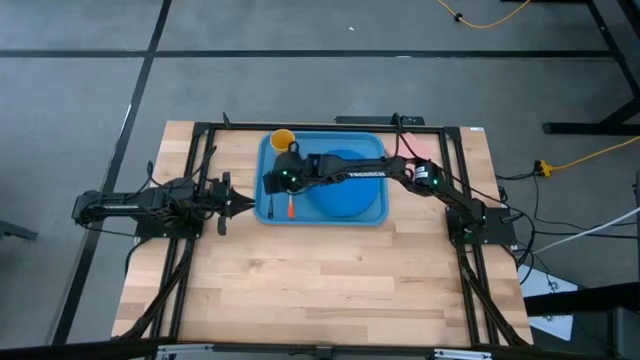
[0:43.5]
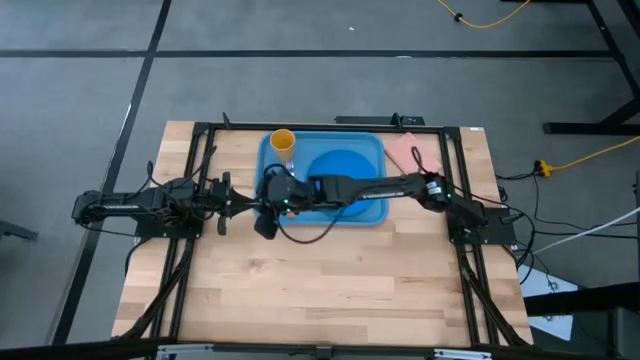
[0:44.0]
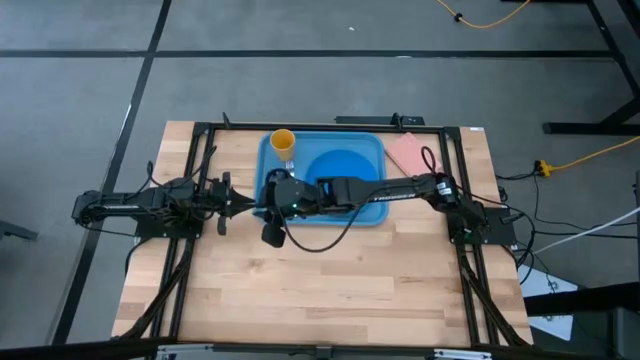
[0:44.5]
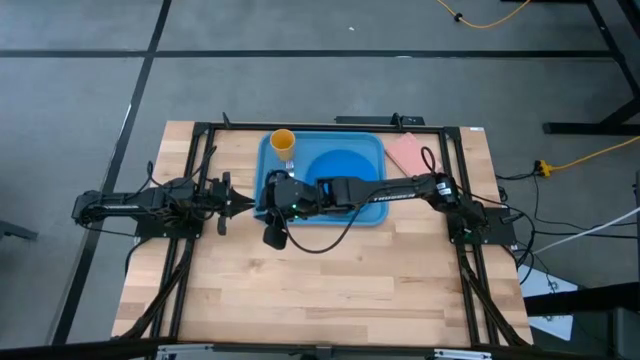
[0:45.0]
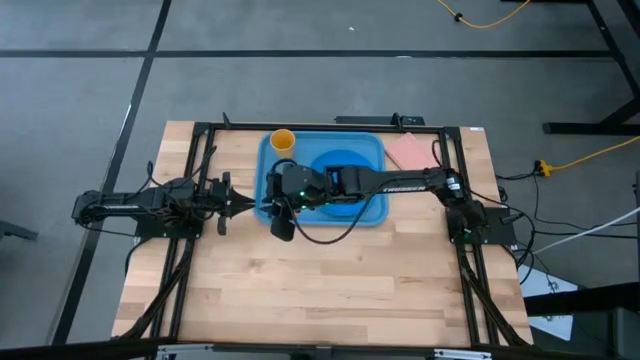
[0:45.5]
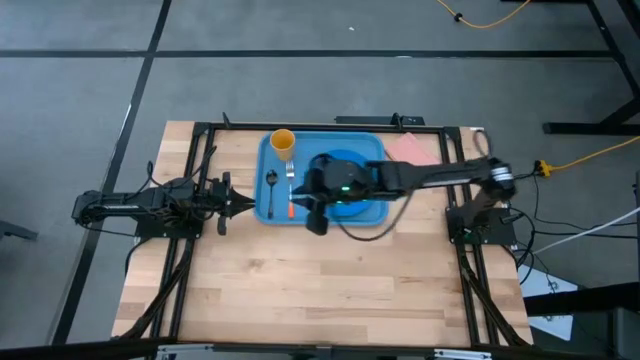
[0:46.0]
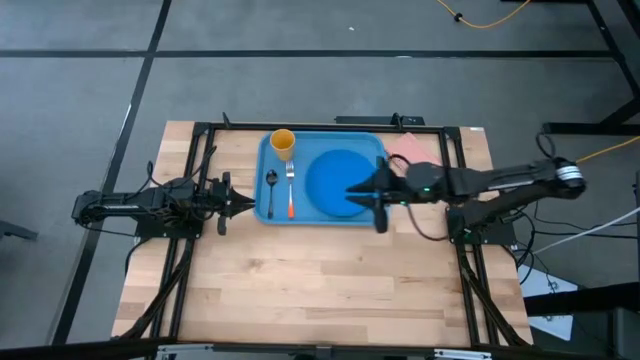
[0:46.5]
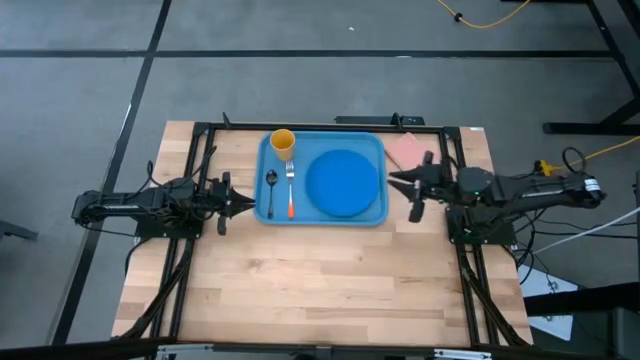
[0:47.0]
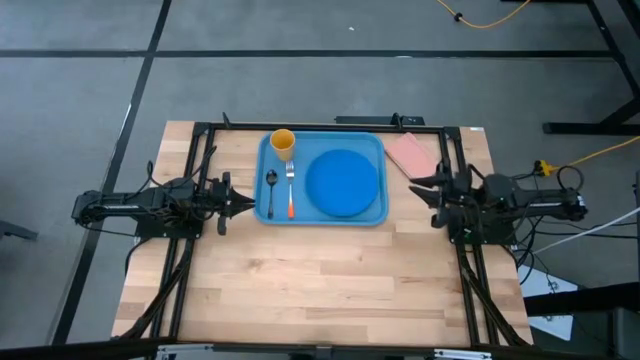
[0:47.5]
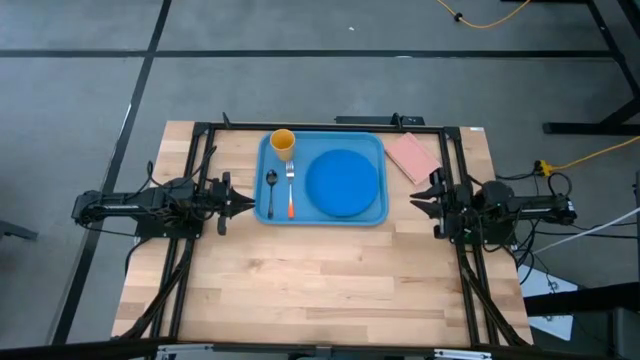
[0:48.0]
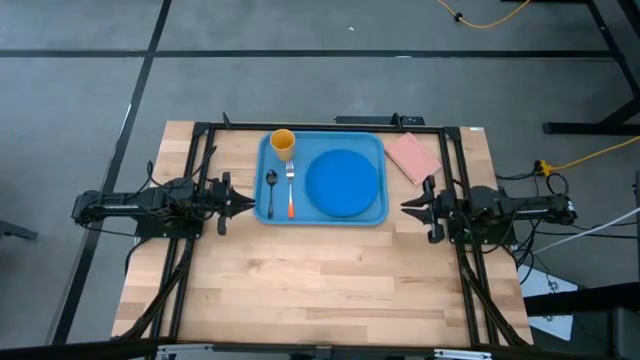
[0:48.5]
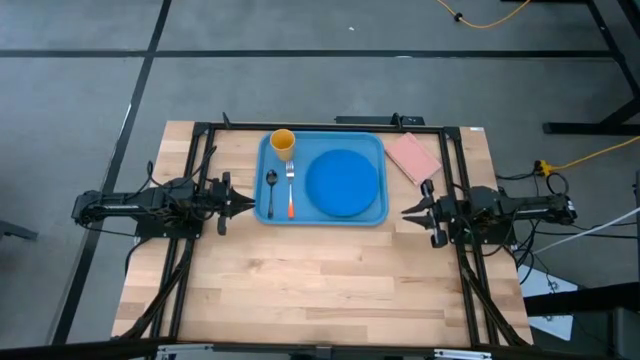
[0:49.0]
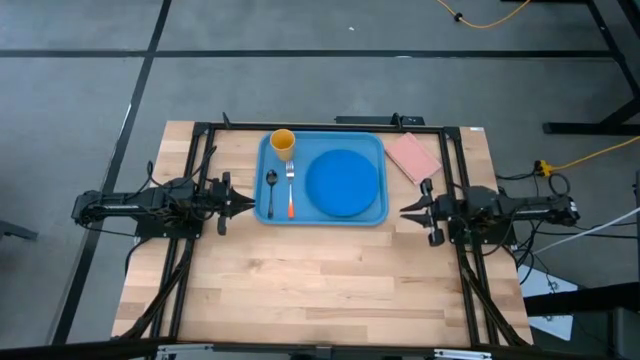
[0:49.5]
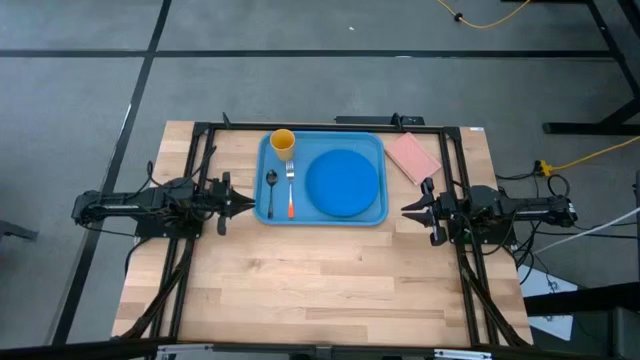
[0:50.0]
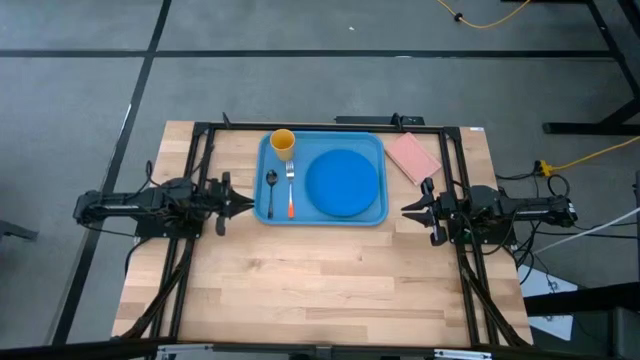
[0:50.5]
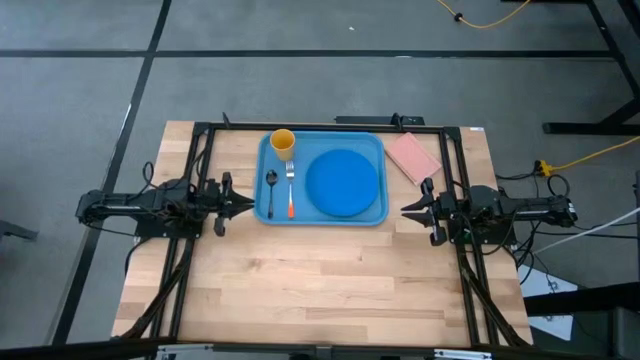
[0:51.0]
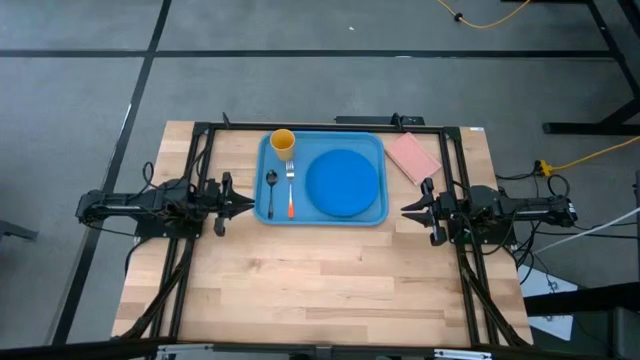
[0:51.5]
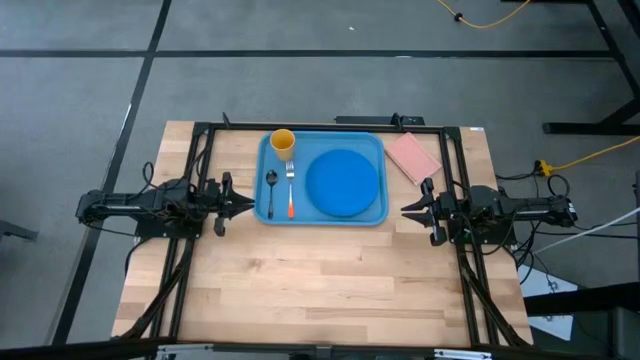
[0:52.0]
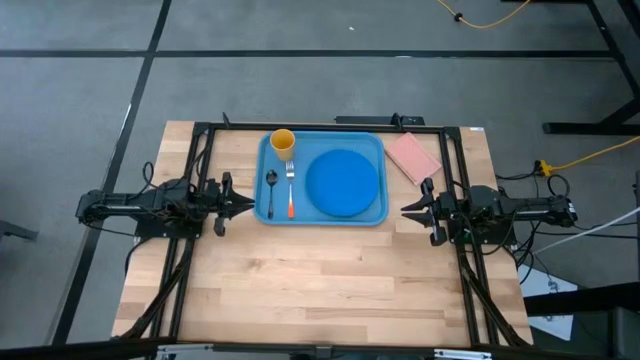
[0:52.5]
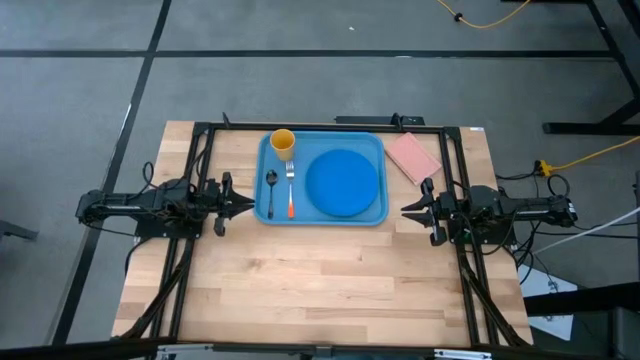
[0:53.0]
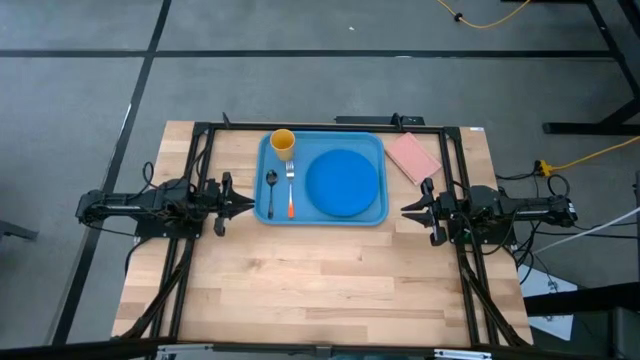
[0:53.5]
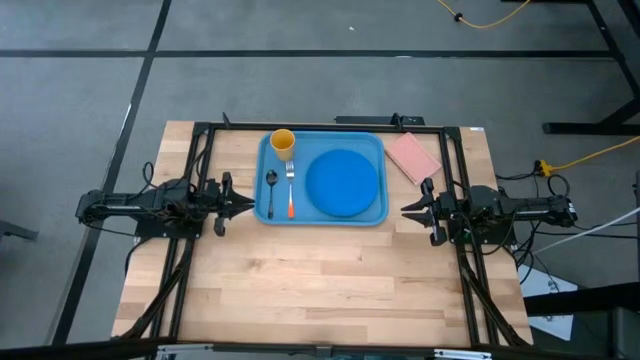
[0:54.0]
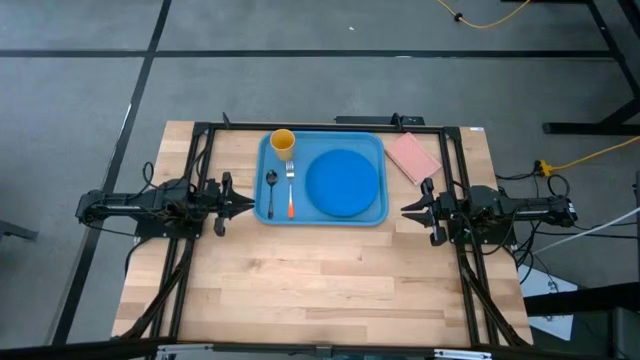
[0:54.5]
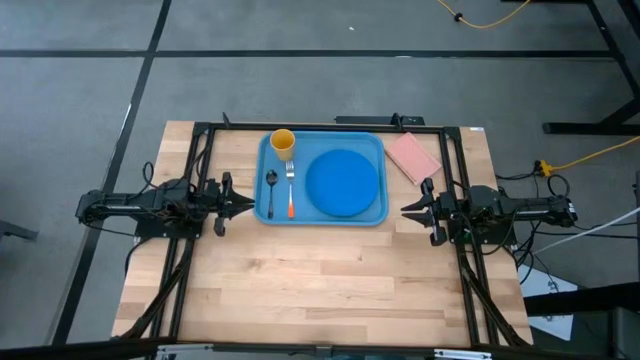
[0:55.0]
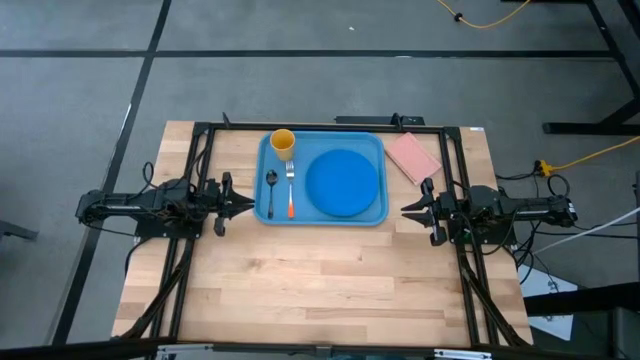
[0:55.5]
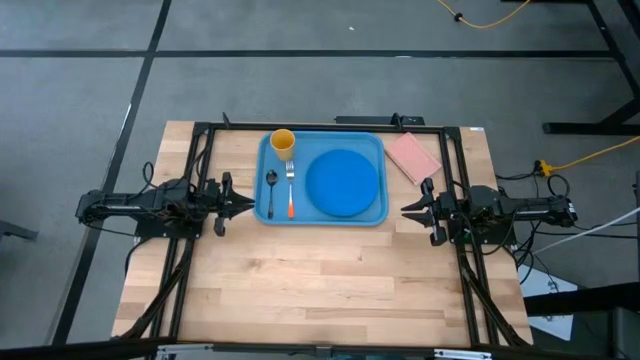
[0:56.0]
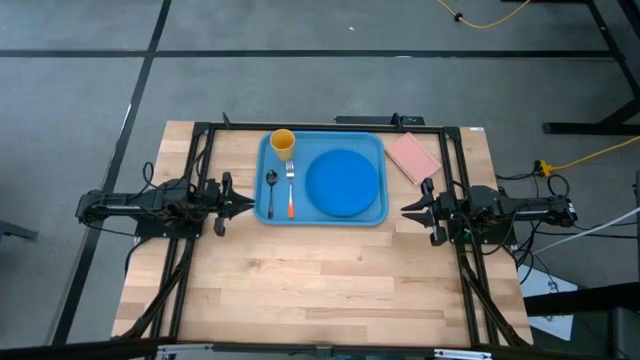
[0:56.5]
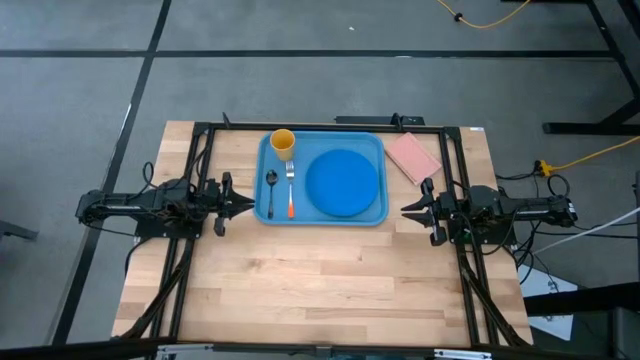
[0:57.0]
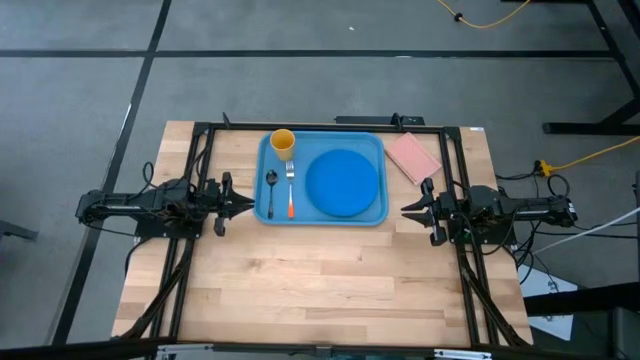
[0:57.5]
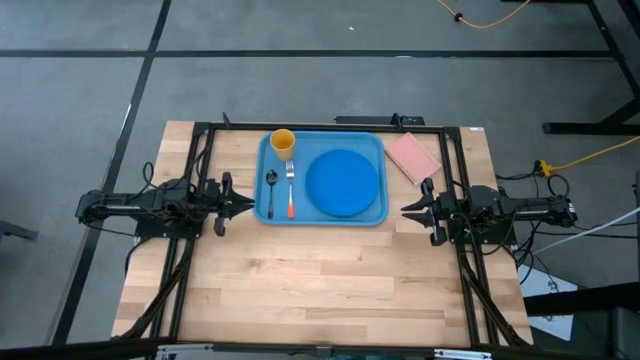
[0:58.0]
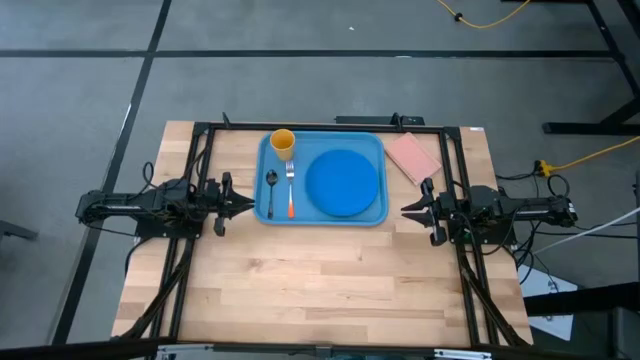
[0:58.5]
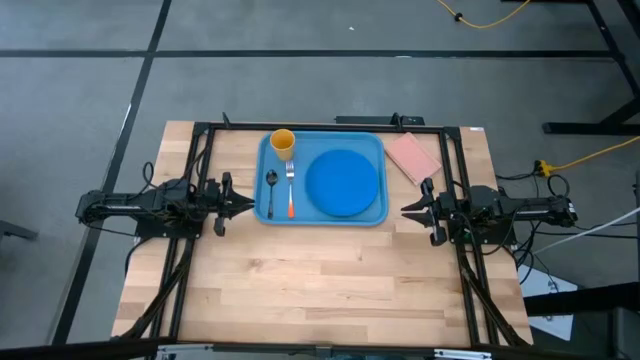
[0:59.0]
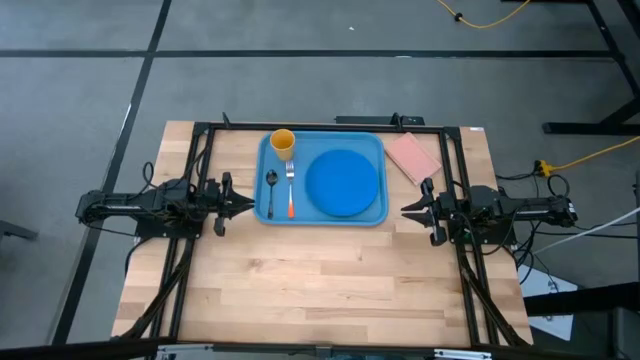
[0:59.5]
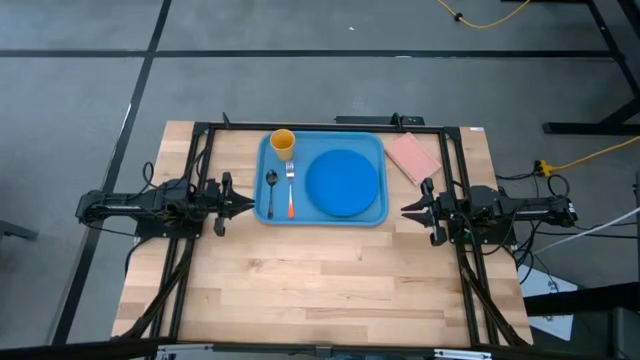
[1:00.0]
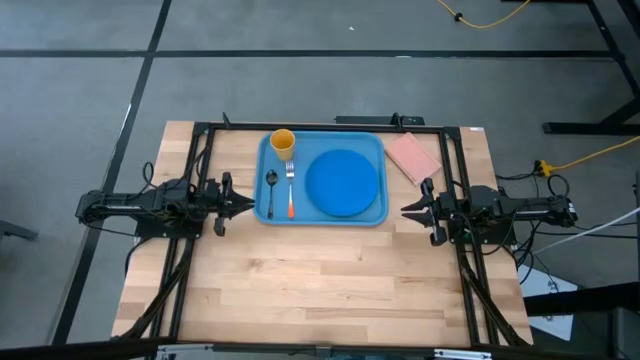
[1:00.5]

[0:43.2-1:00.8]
Task: Pick and place plate/cup/fork/spoon on tray
Return to Home Position

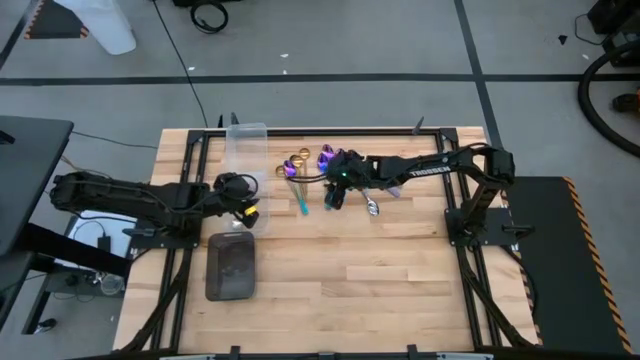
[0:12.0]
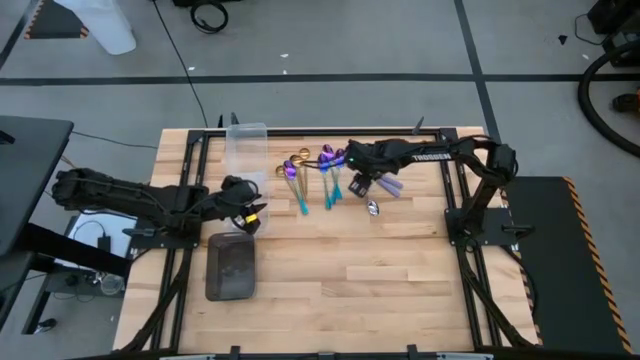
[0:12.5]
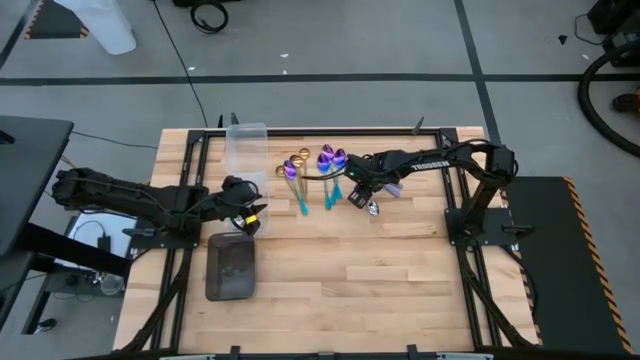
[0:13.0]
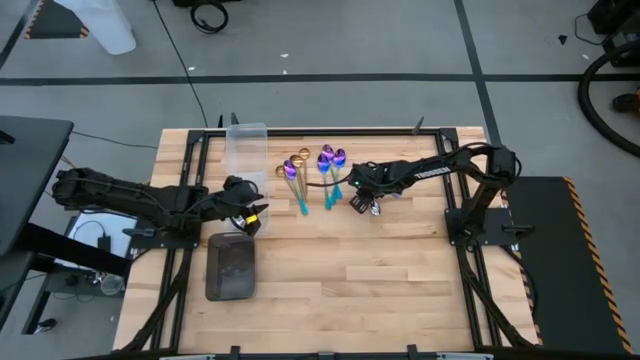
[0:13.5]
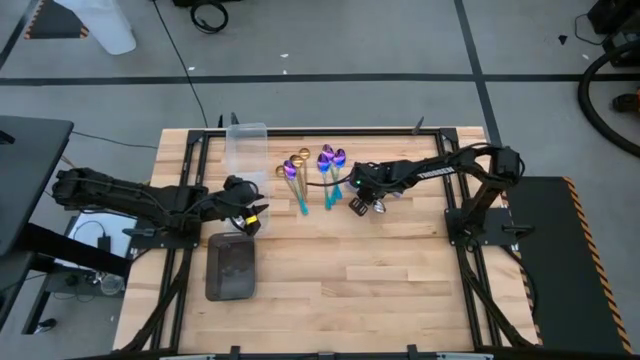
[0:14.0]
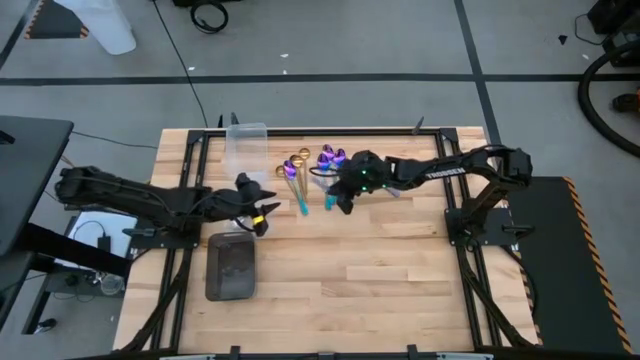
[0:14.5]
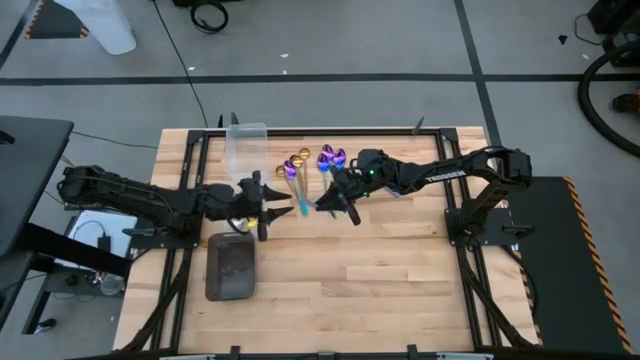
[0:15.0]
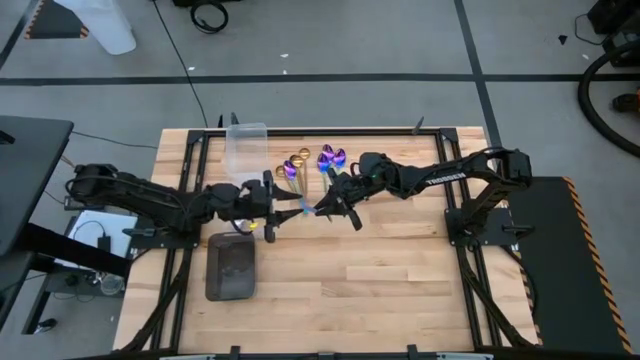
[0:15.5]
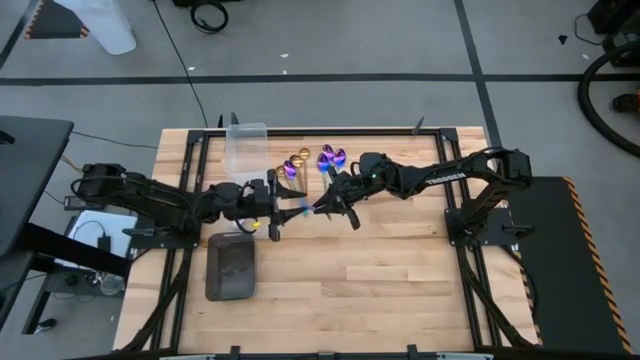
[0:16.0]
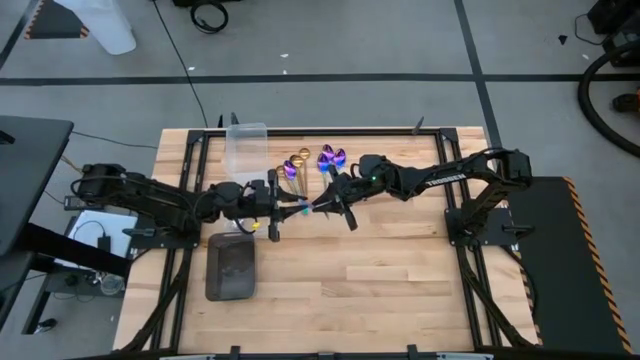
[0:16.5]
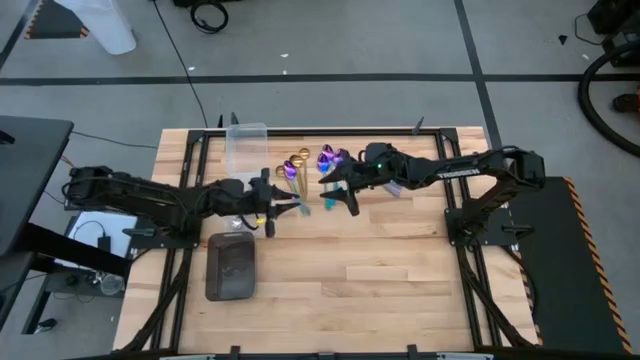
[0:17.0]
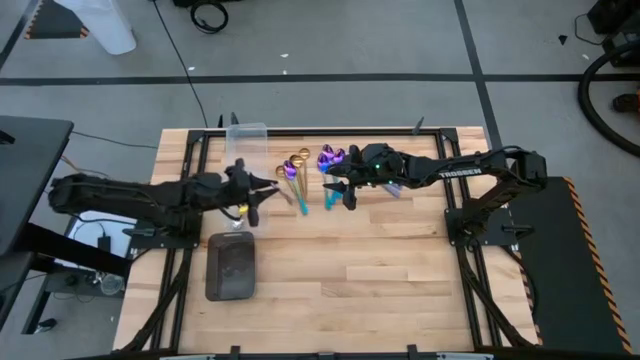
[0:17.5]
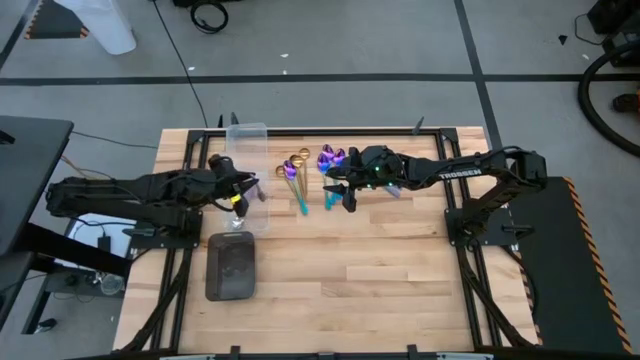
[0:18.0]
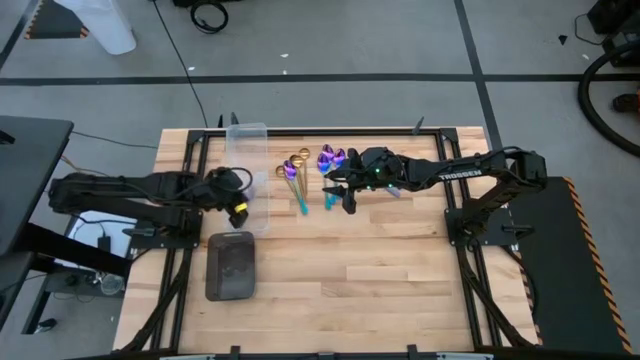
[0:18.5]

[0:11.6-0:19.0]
Task: Sort silverware by color (type)
Put the blue spoon into the bottom transparent bin
